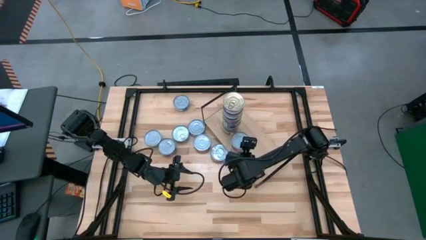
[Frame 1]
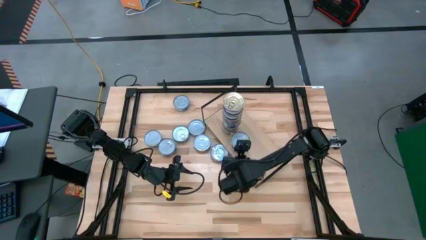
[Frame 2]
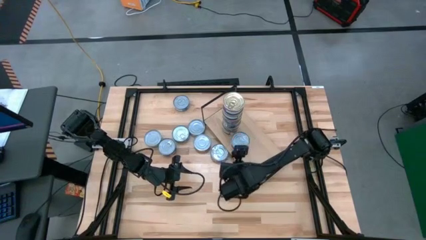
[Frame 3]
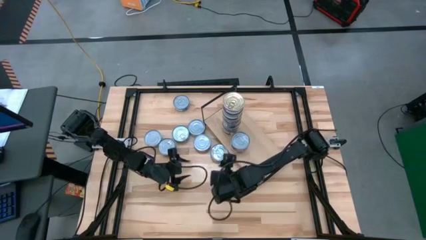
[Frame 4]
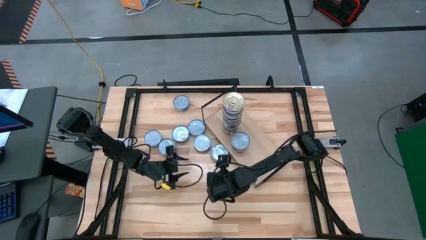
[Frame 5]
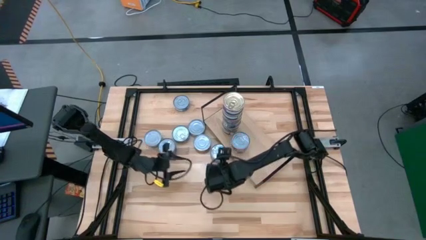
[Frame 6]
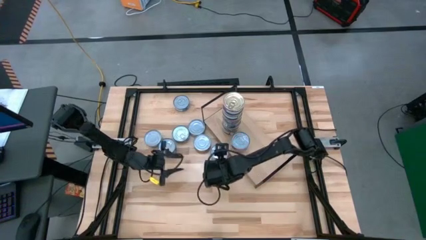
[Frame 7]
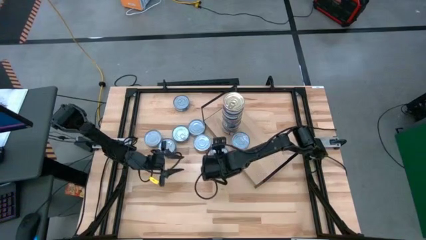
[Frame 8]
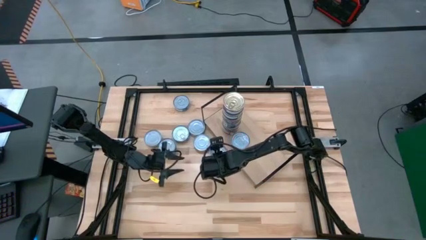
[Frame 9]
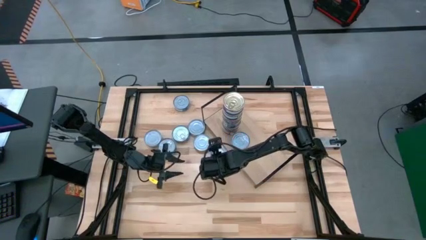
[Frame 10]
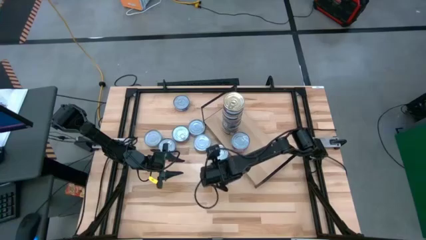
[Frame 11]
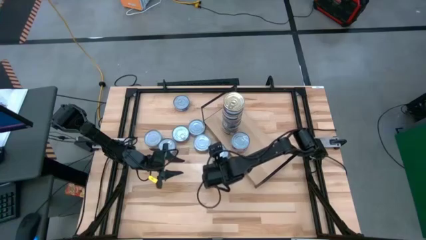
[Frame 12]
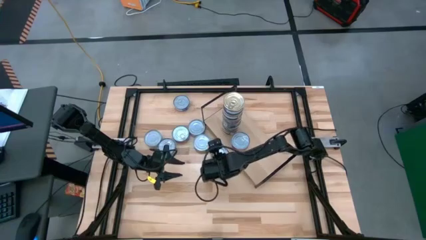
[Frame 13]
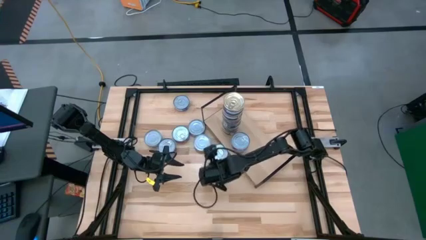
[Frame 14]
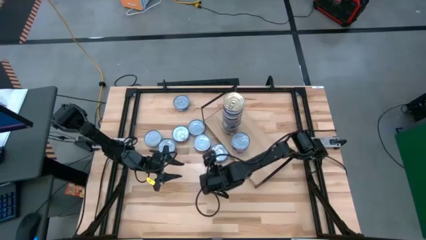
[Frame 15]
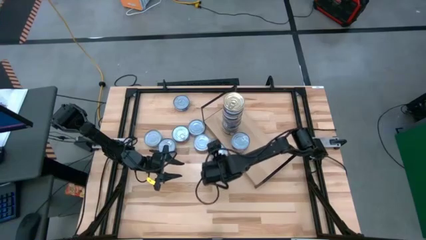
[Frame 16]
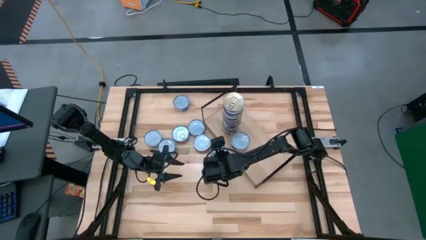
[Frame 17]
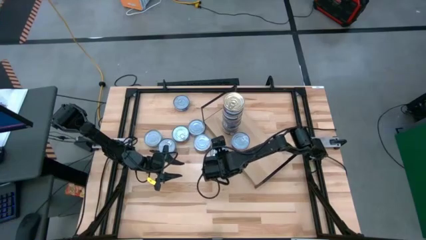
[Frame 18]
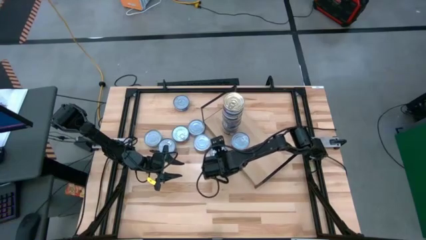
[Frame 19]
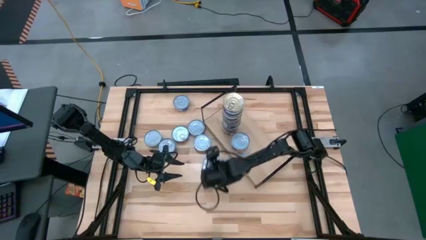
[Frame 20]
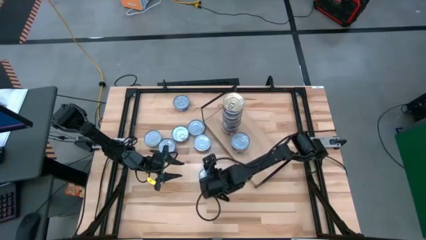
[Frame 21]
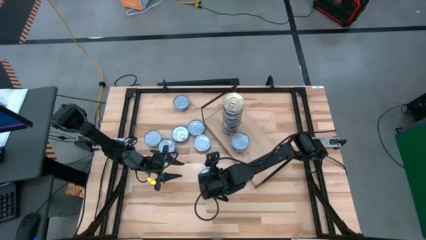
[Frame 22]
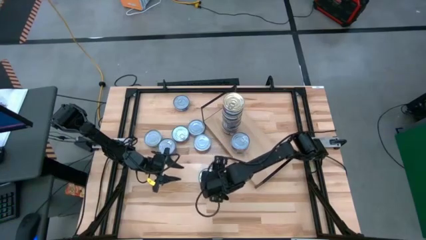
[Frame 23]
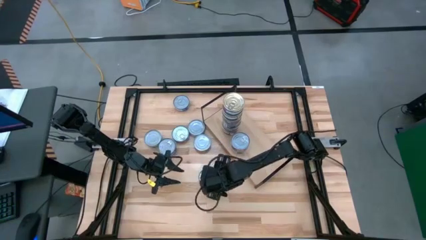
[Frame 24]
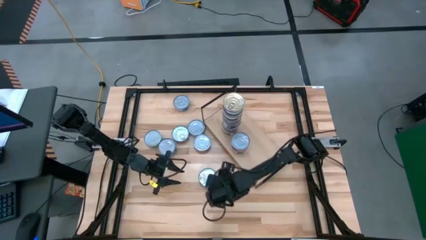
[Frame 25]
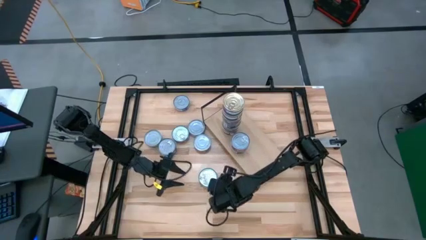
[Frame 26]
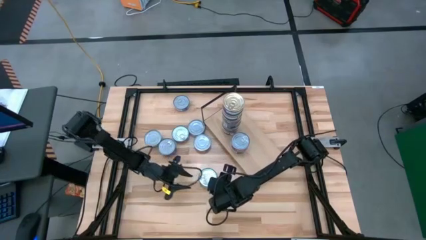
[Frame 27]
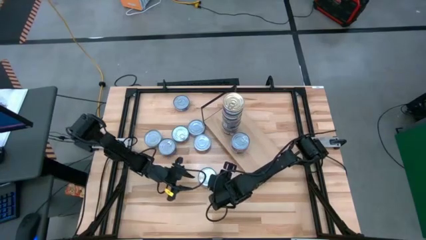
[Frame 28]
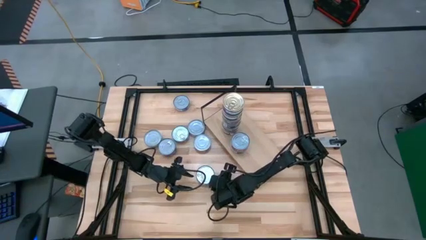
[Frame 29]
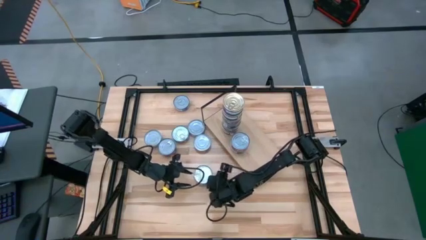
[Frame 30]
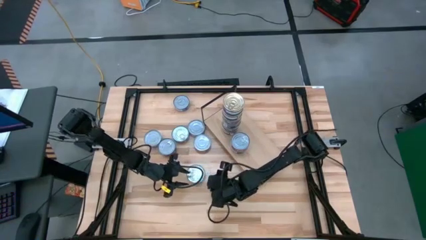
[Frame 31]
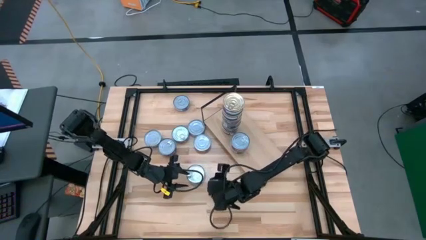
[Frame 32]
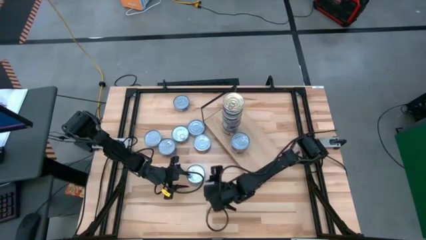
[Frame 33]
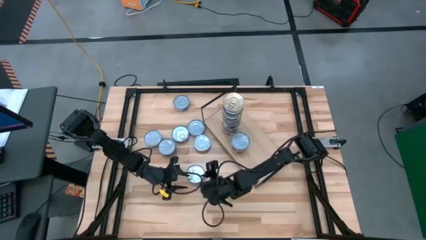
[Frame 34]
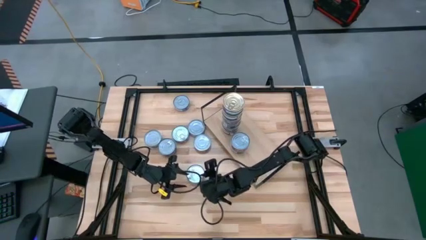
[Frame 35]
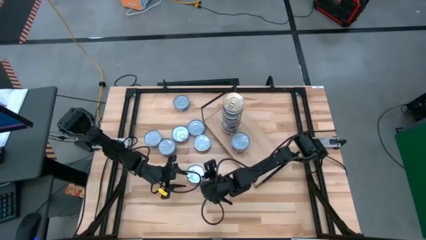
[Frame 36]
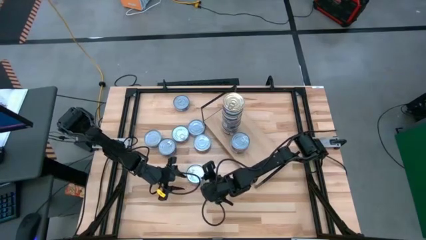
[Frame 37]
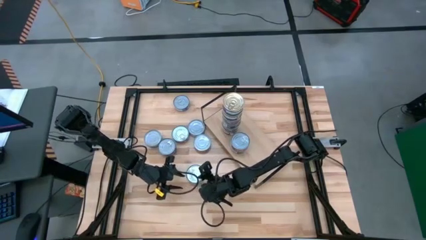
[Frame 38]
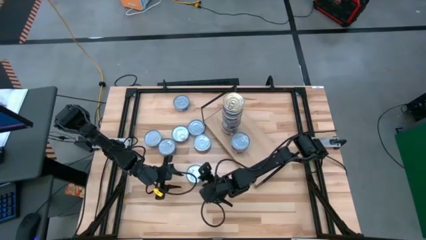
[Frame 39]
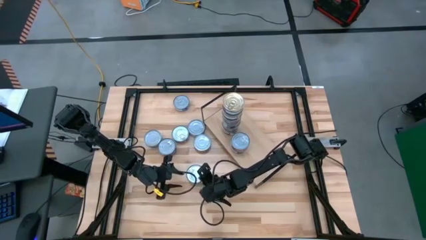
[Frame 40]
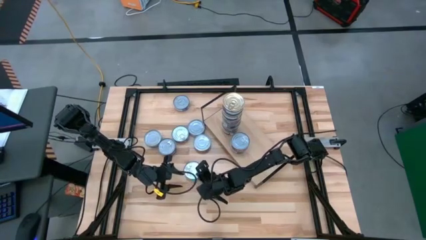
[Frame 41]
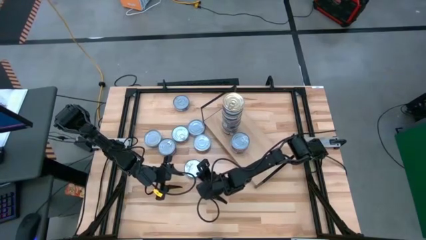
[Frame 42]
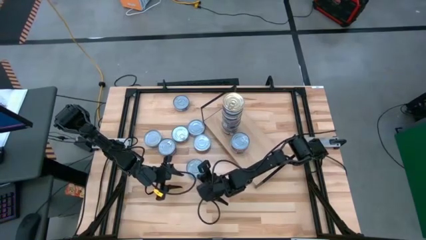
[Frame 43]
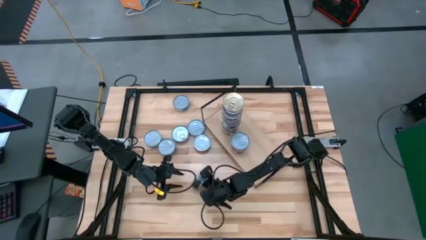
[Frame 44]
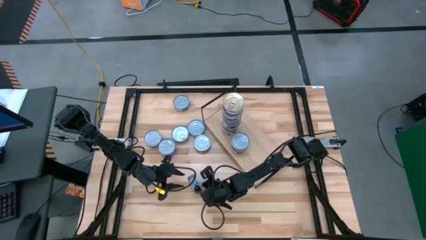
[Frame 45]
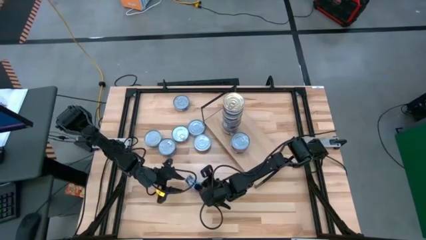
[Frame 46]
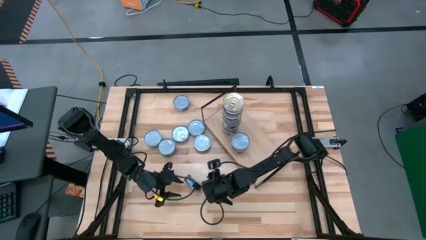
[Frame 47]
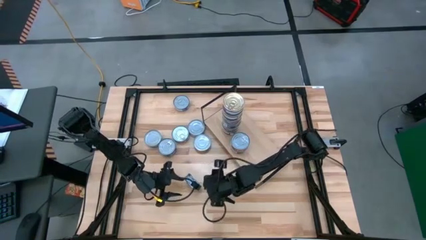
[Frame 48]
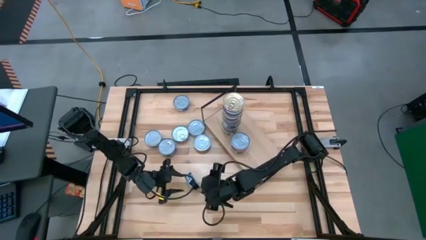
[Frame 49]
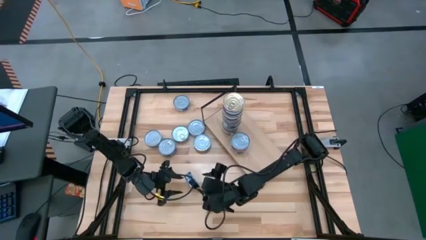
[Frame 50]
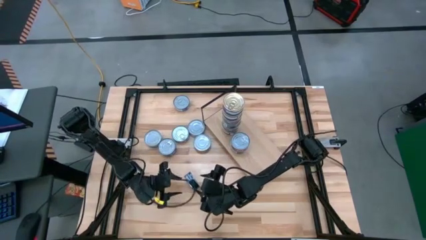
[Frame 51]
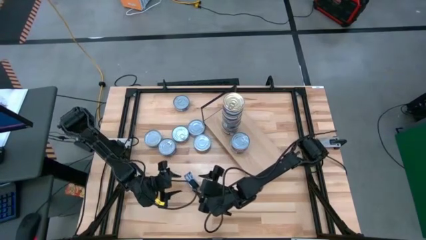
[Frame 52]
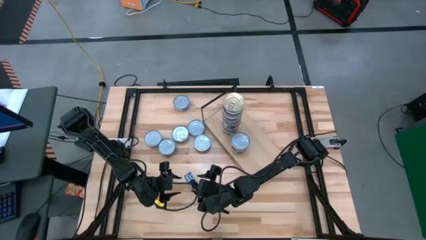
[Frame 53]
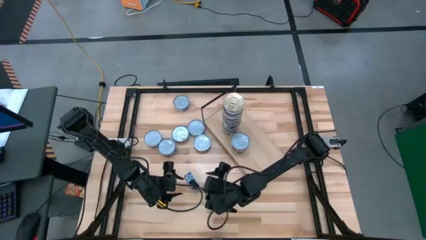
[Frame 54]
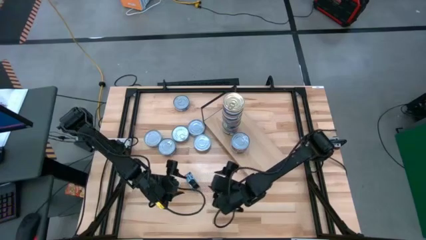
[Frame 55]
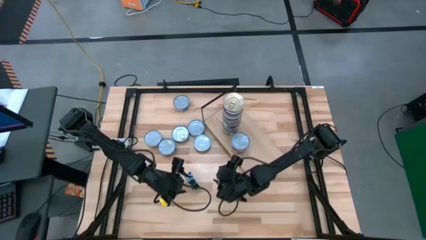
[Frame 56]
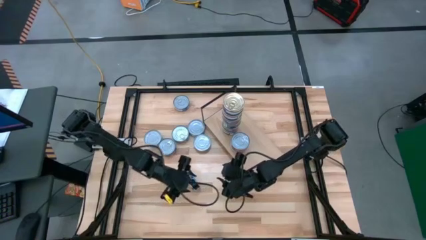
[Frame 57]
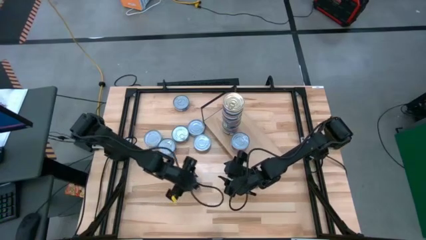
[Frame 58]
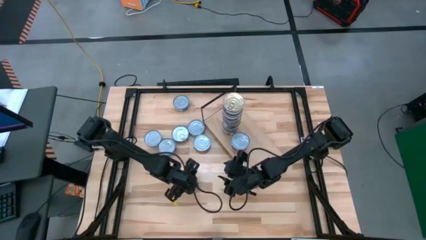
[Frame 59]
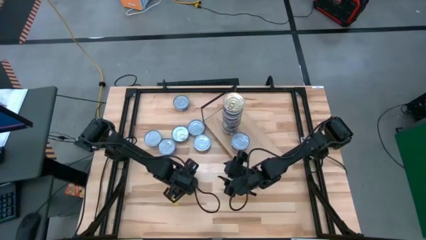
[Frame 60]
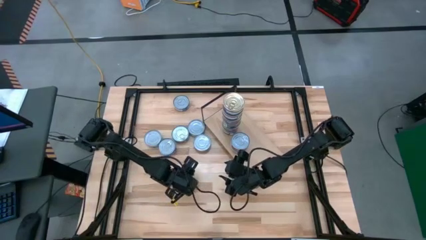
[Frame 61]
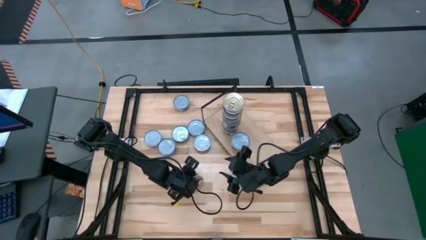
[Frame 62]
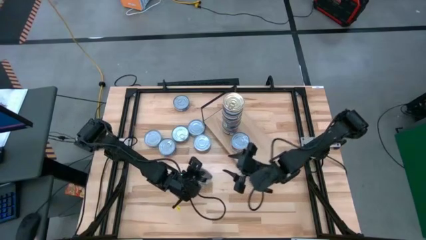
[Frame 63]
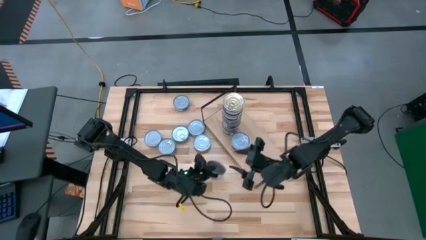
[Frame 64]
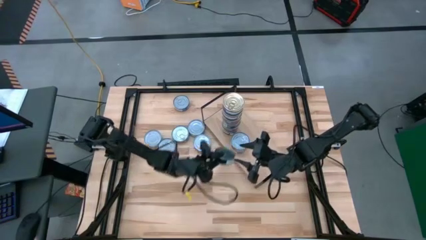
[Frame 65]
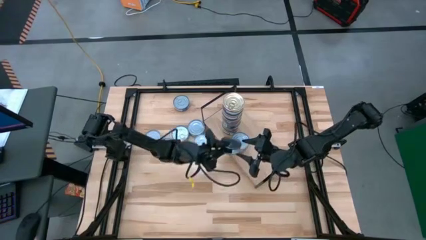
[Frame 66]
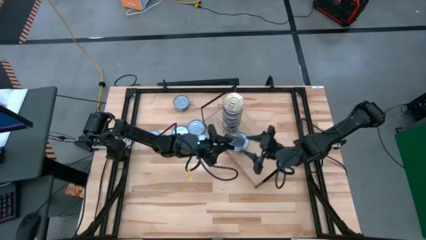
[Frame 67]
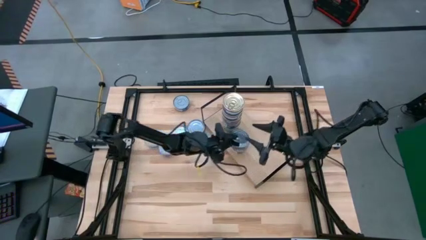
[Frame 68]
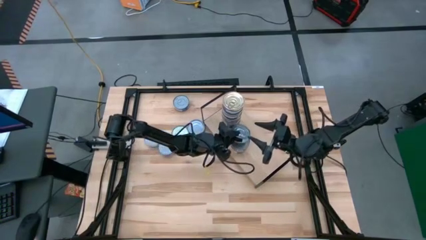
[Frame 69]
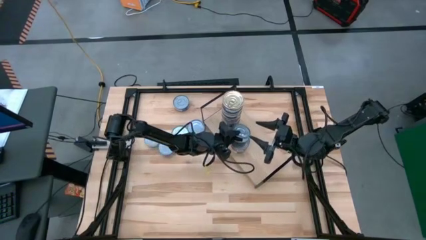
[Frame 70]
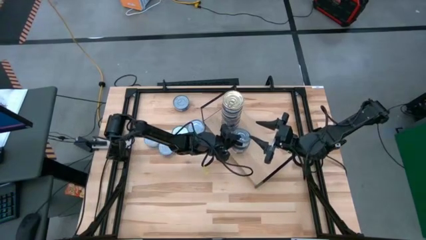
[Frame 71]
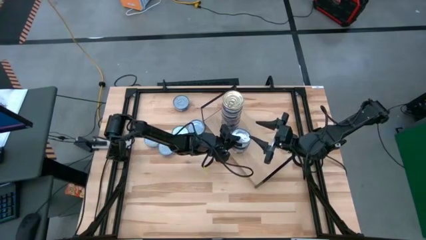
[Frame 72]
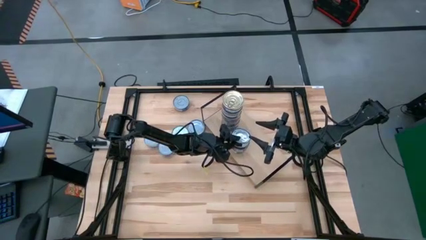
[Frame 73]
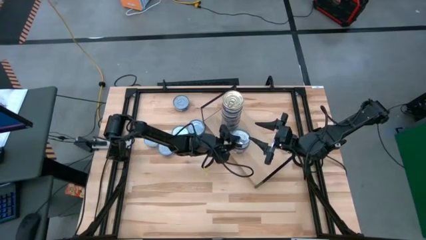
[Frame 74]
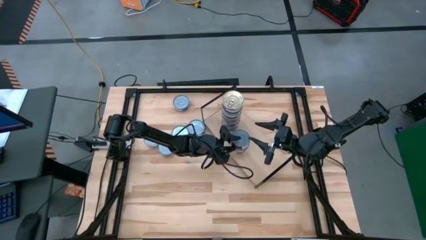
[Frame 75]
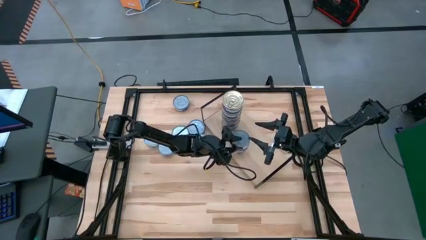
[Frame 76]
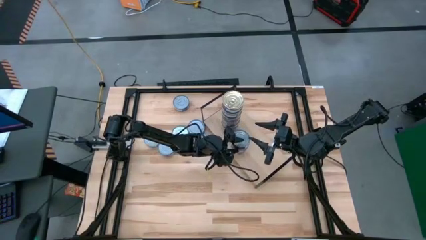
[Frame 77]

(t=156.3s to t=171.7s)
Task: Stack canned seafood by type on shelf
Stack the blue tuna can on top of the red tuna can on the shelf
